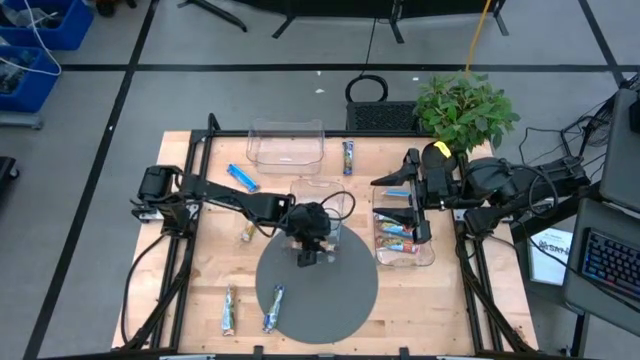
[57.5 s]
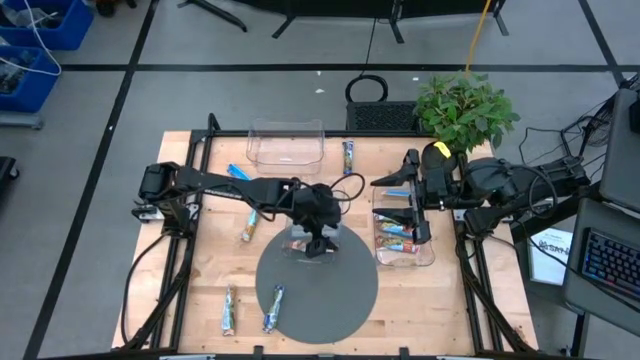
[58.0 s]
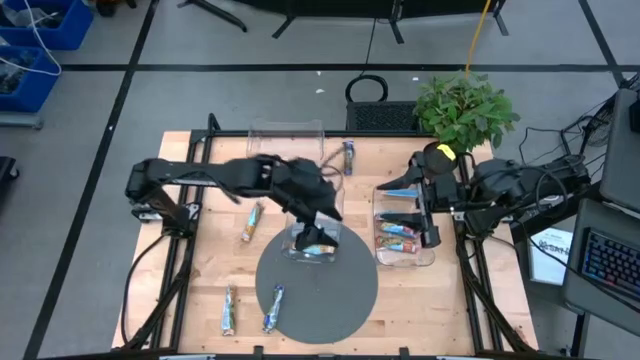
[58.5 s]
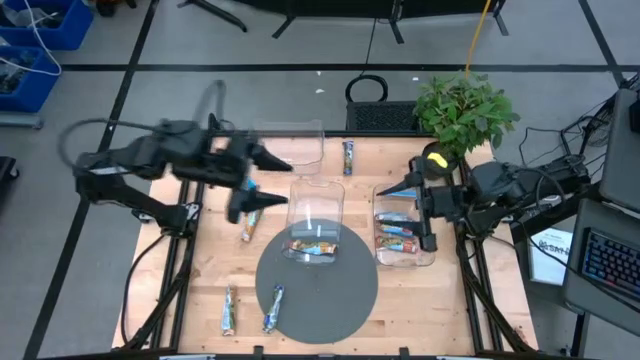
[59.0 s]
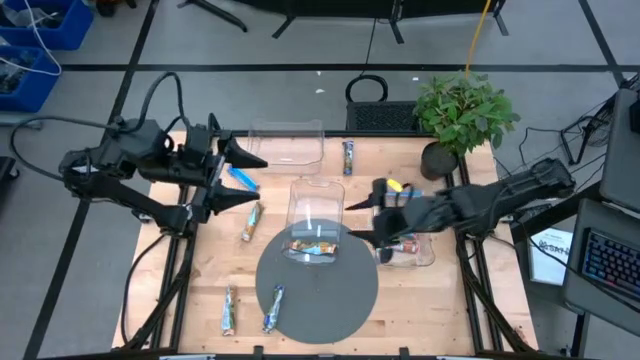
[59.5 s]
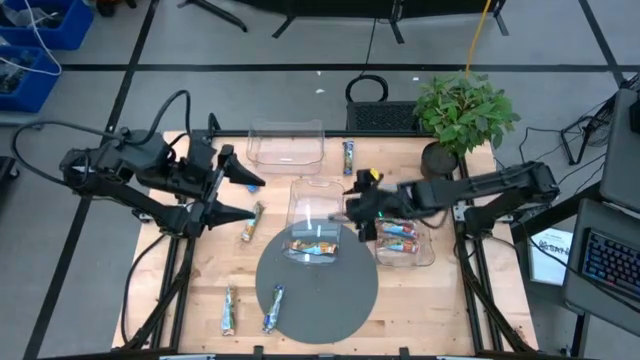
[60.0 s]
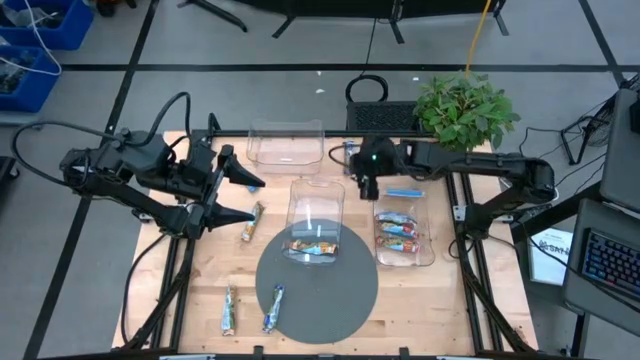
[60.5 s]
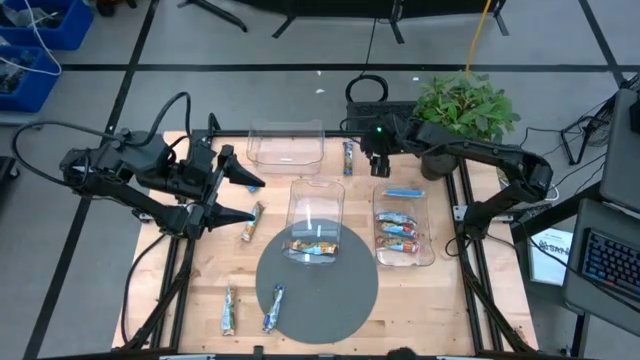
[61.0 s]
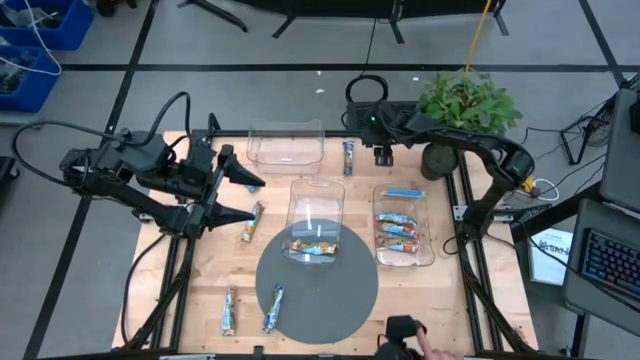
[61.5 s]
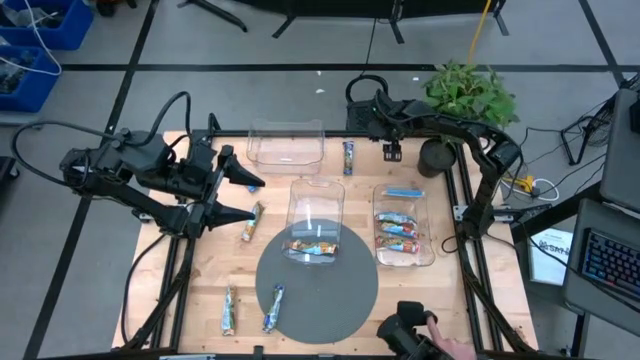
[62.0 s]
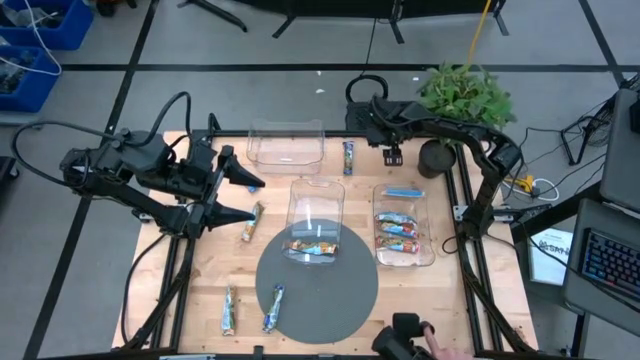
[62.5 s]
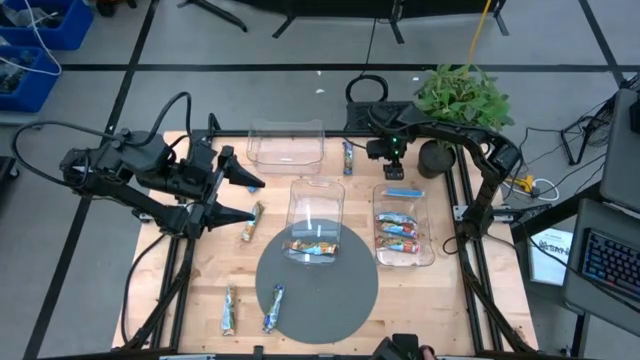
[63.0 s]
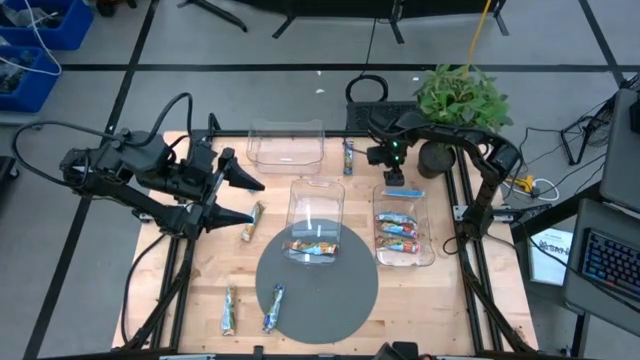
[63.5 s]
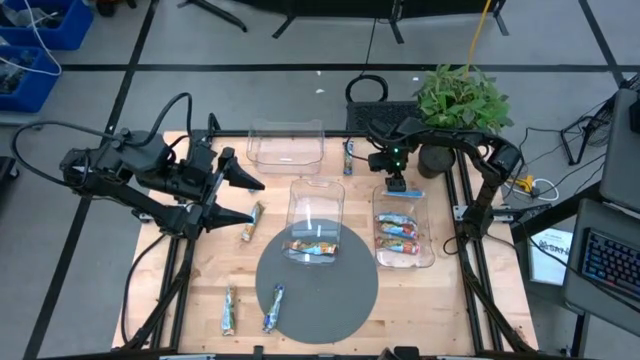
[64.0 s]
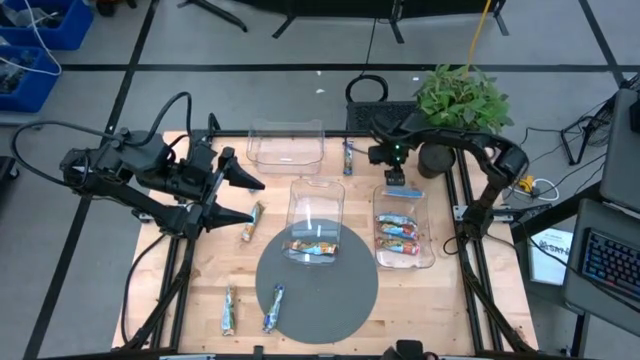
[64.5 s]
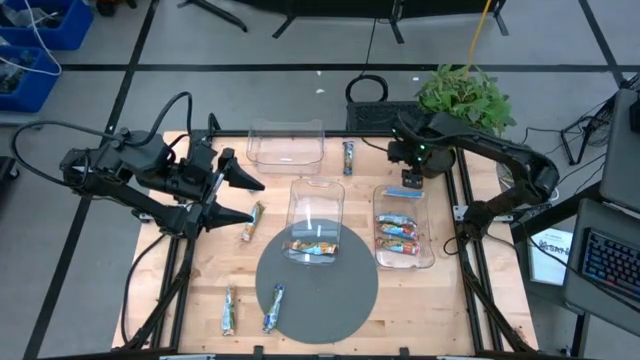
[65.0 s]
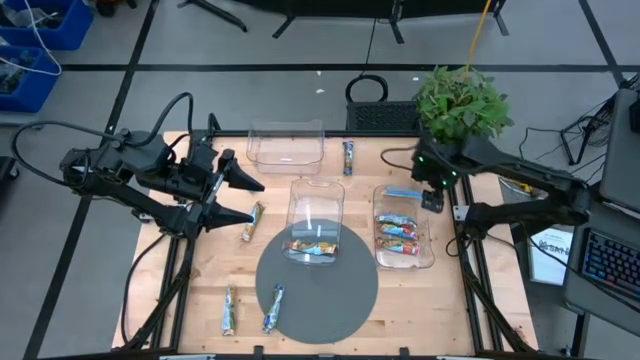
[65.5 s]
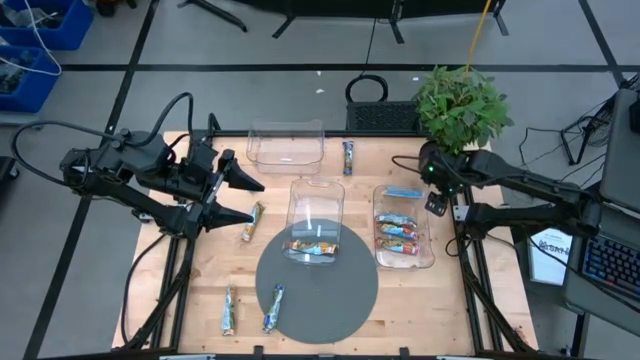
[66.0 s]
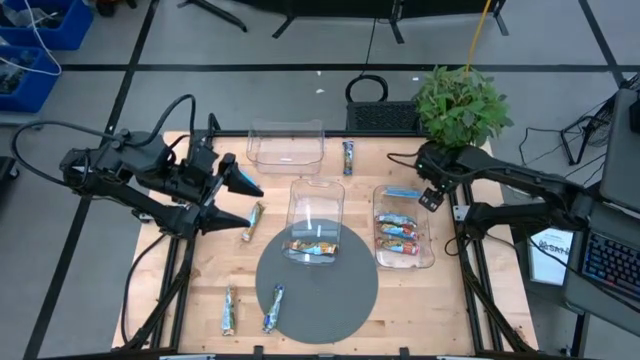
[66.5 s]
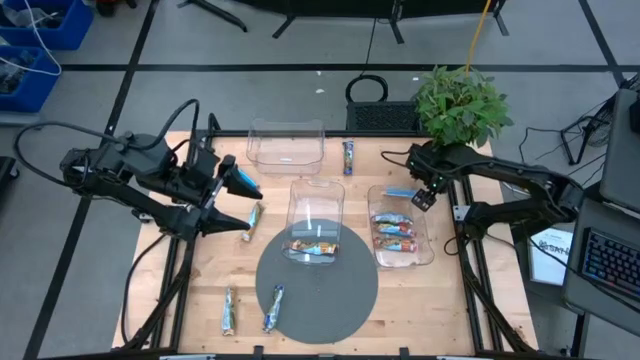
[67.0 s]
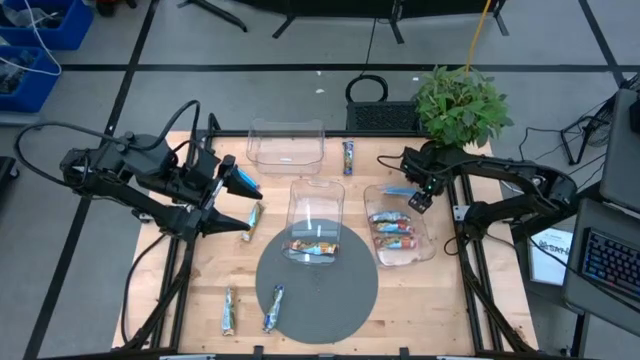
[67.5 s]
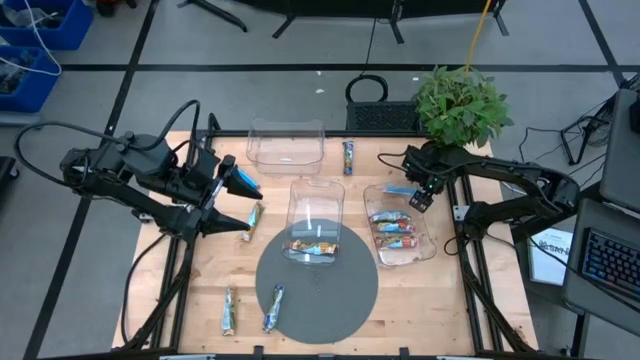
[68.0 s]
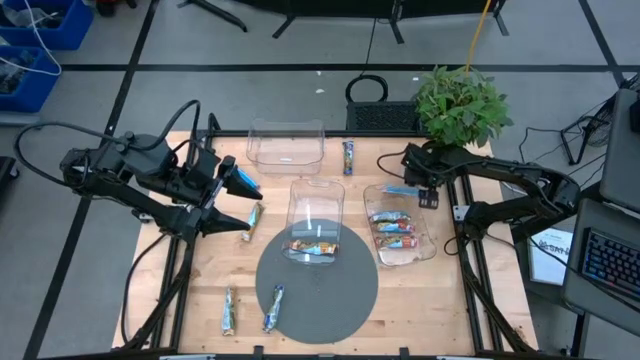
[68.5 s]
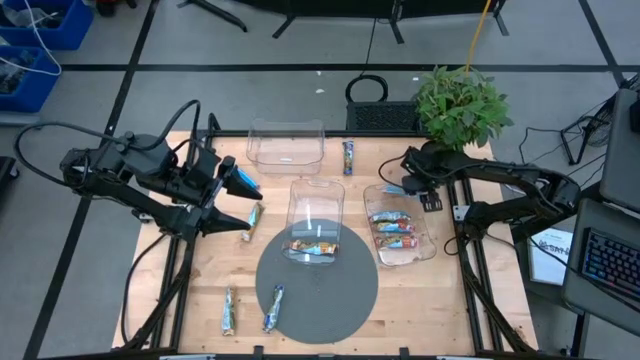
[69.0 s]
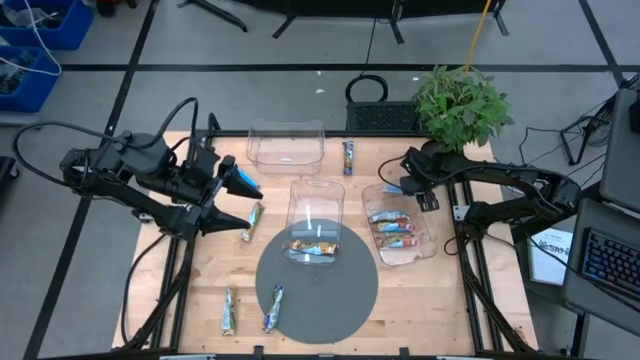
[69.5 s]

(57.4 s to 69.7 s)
Task: Pick and place Granola Bars by type
Put the yellow granola bar into the bottom left transparent bin

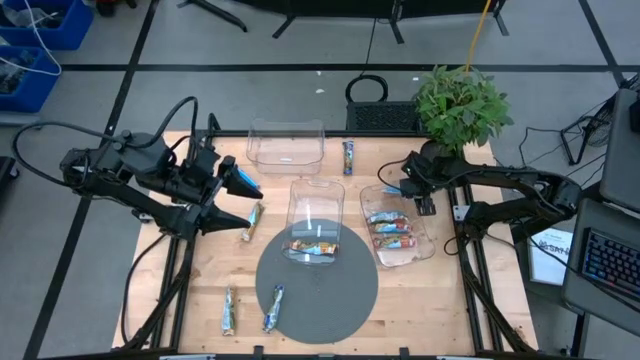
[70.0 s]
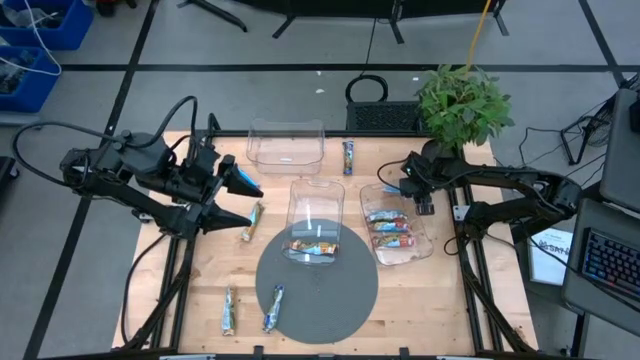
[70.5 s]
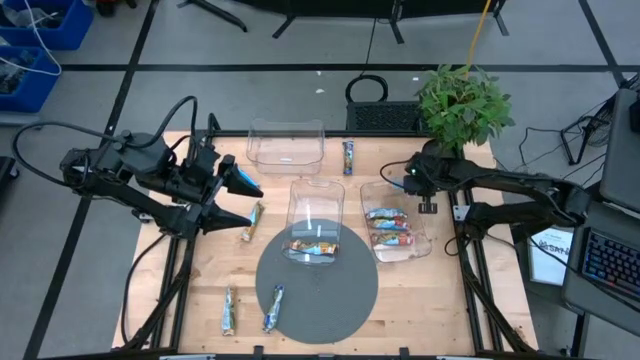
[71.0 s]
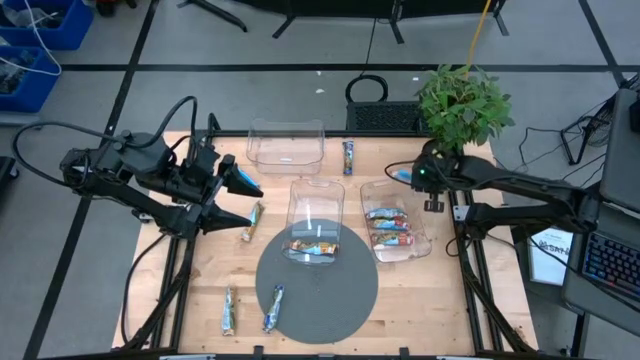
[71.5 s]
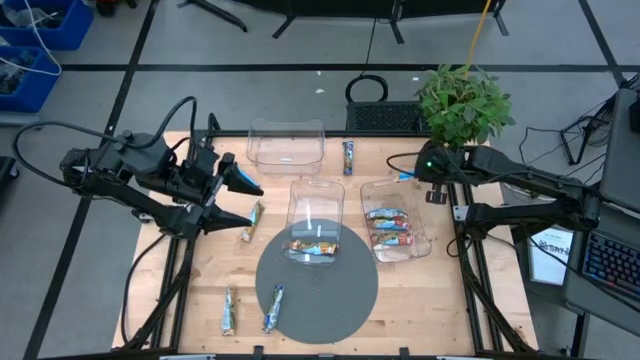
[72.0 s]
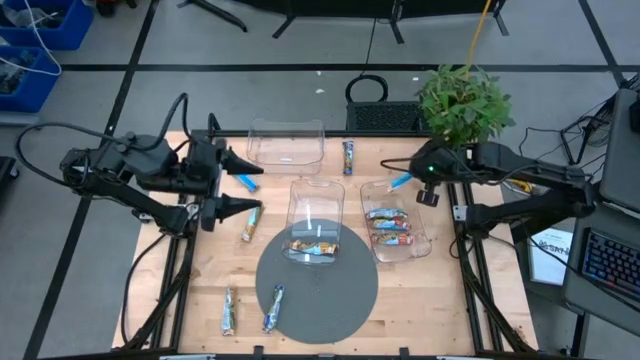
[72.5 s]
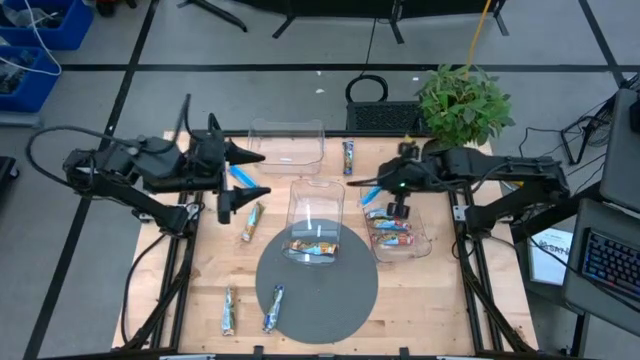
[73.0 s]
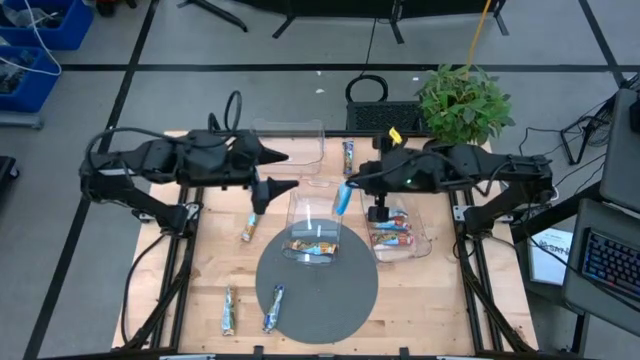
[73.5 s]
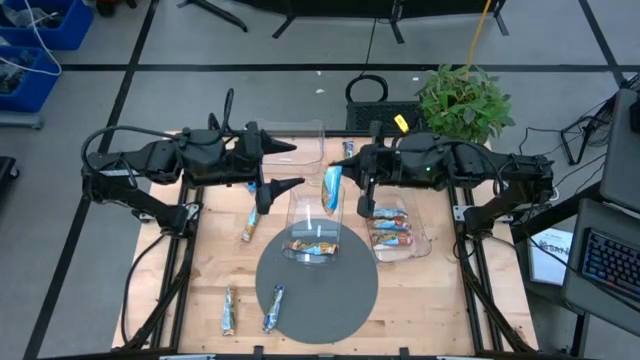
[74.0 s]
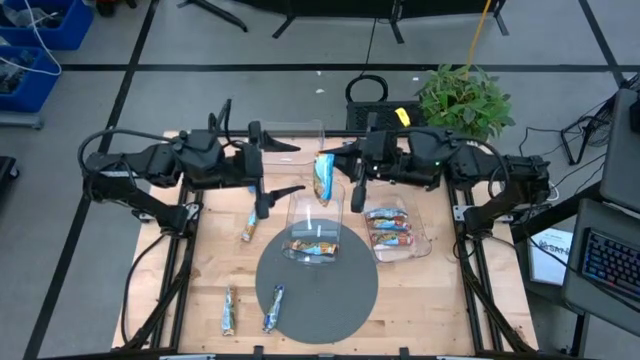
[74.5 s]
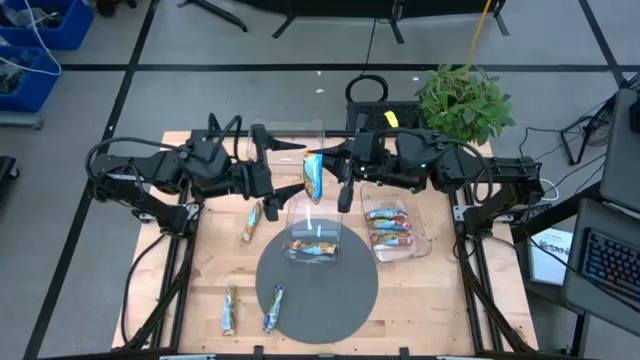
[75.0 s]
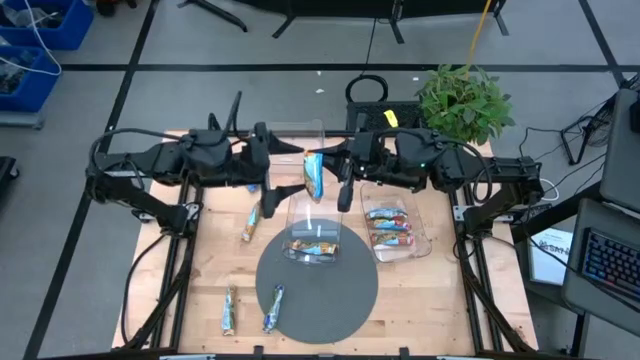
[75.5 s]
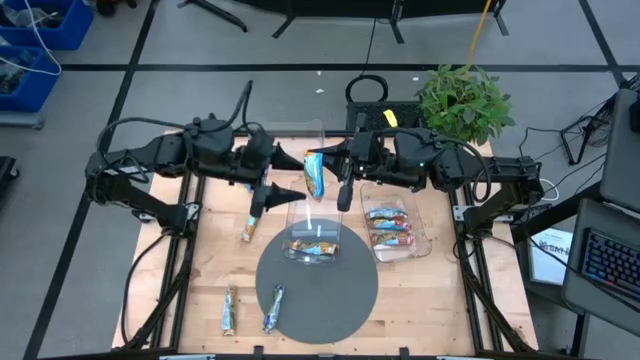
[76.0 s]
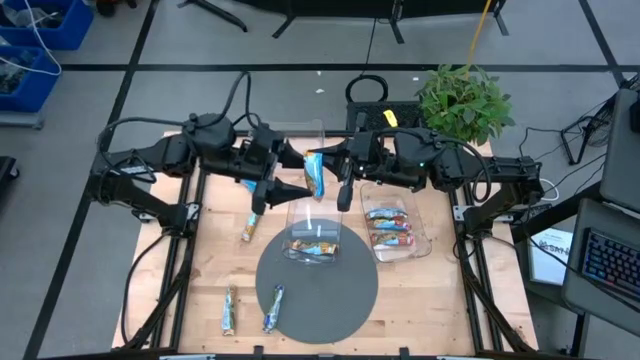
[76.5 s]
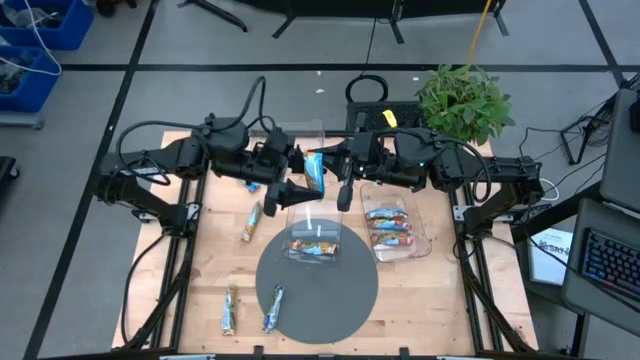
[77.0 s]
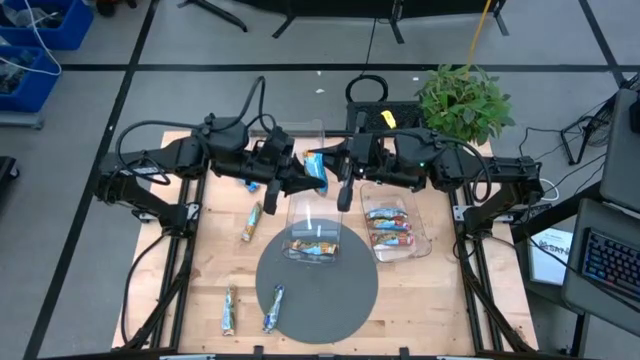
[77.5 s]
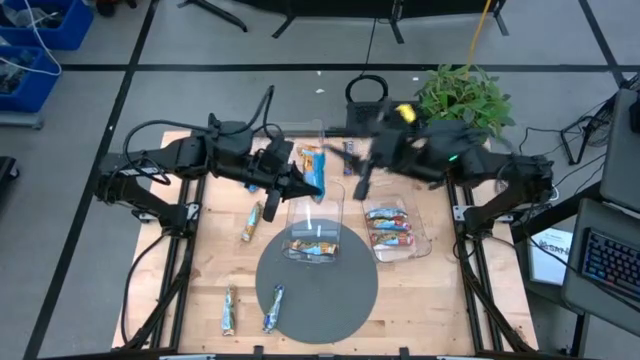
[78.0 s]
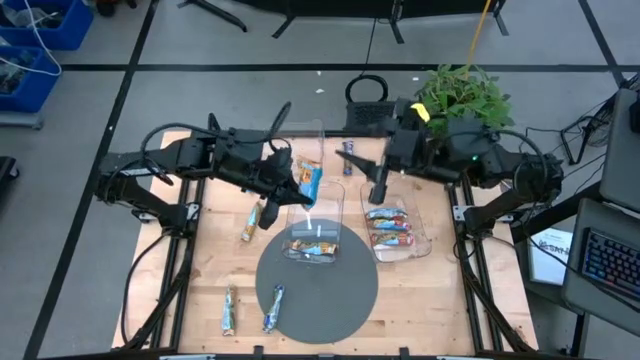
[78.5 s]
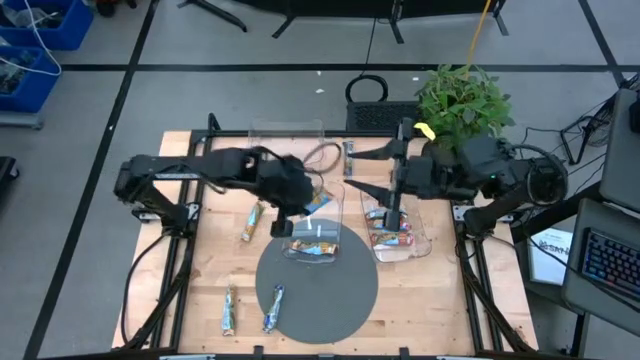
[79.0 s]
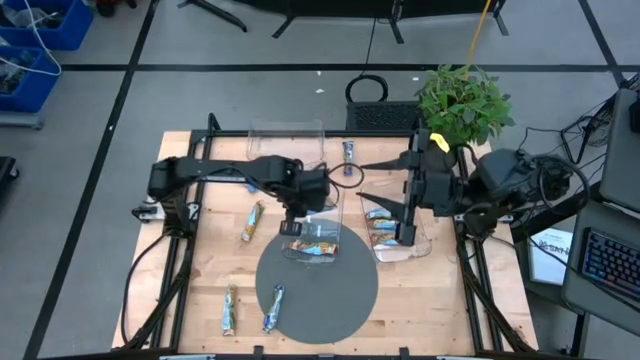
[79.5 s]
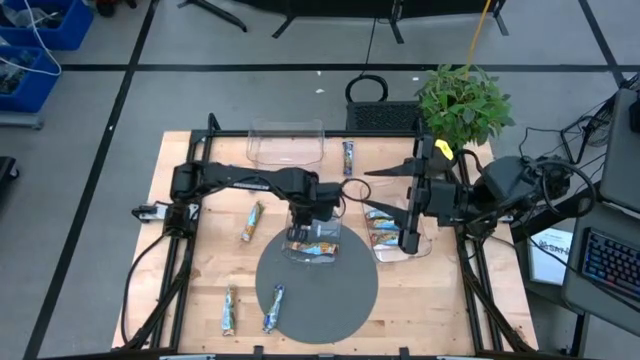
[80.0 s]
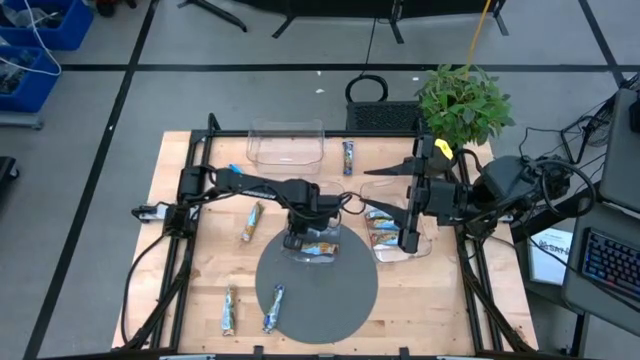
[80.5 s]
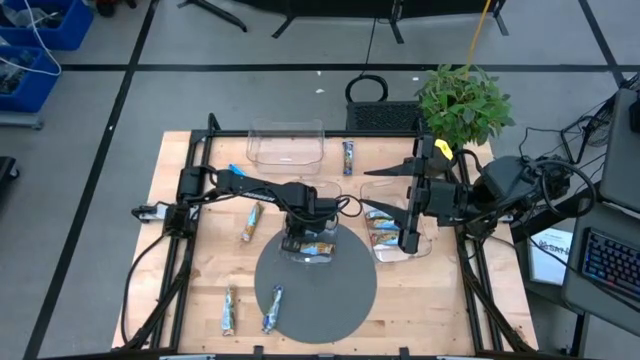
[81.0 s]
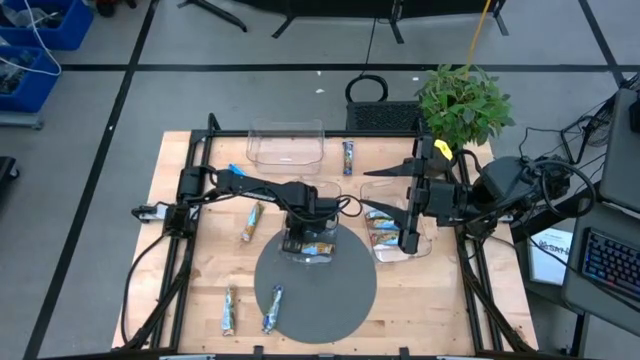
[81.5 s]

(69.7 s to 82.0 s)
Put the yellow granola bar into the bottom left transparent bin
